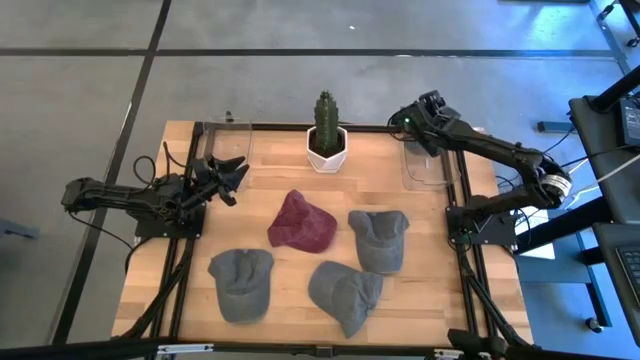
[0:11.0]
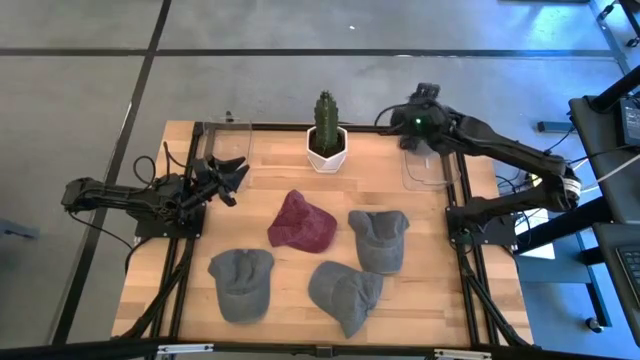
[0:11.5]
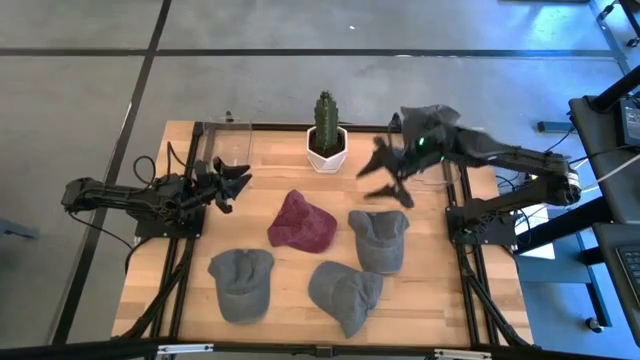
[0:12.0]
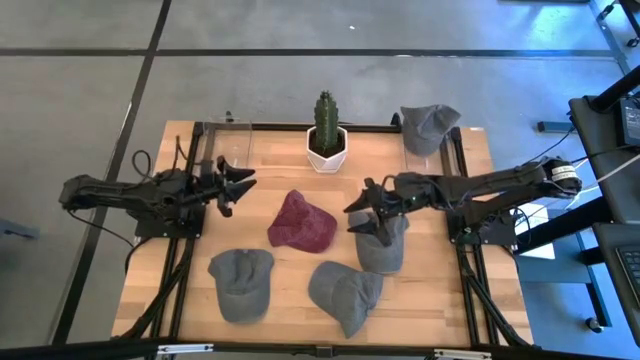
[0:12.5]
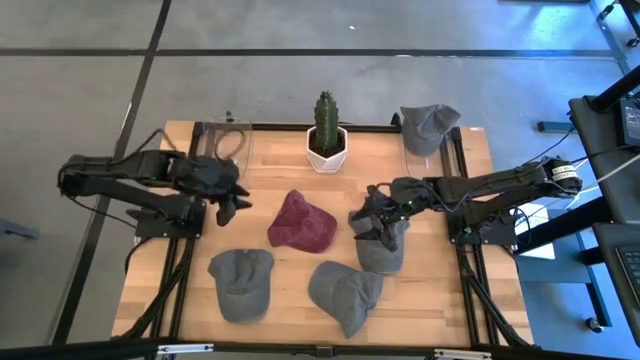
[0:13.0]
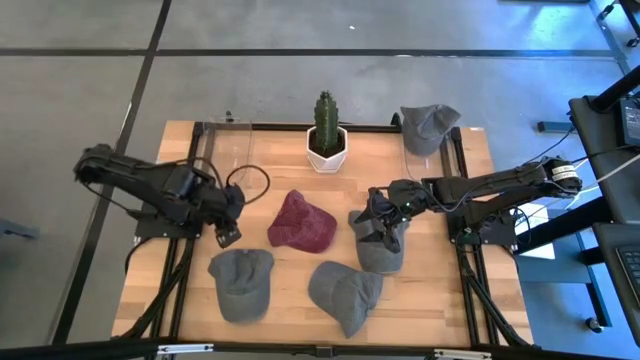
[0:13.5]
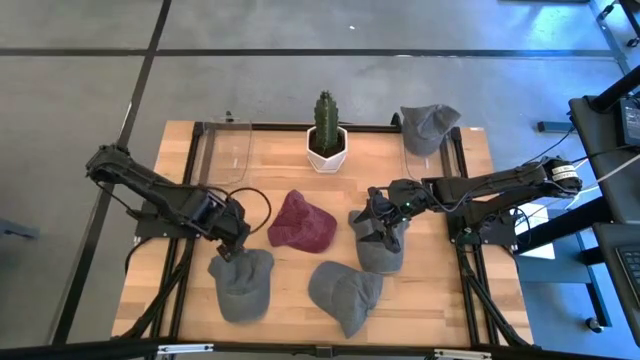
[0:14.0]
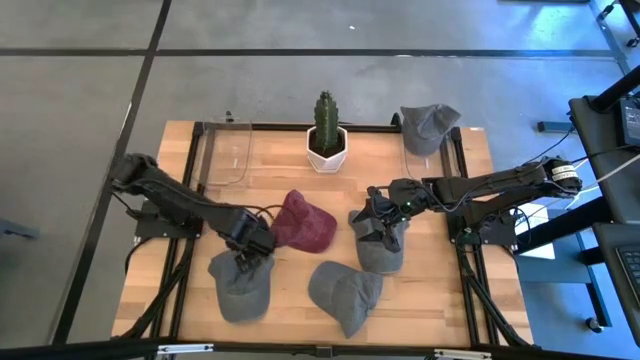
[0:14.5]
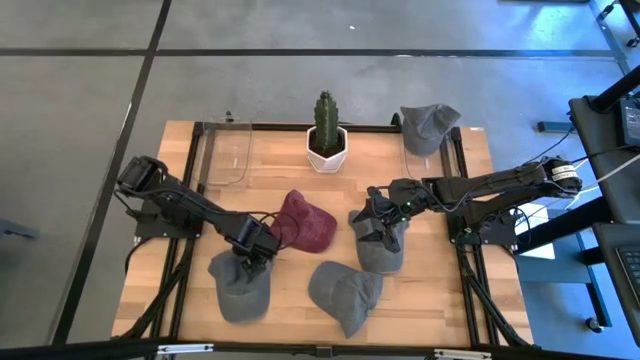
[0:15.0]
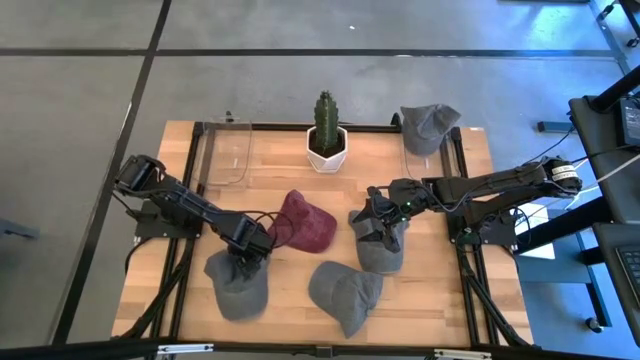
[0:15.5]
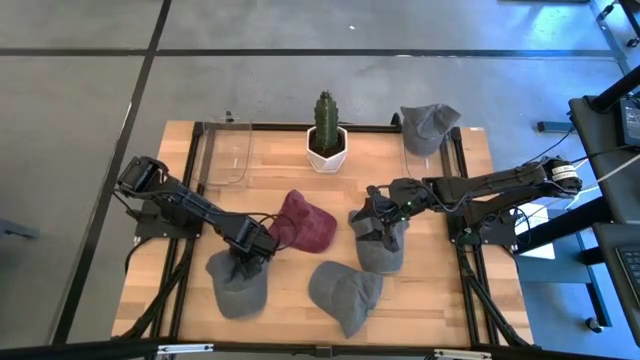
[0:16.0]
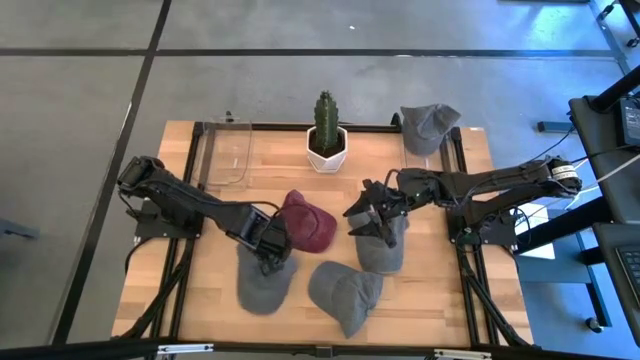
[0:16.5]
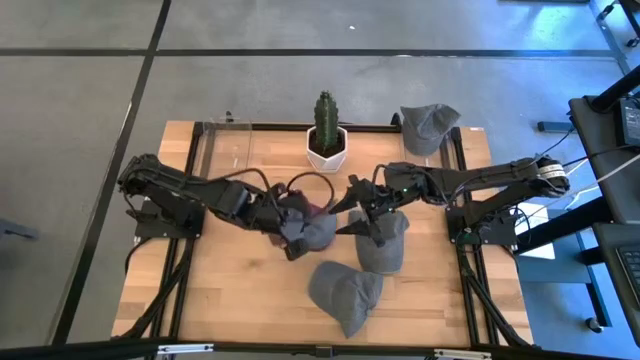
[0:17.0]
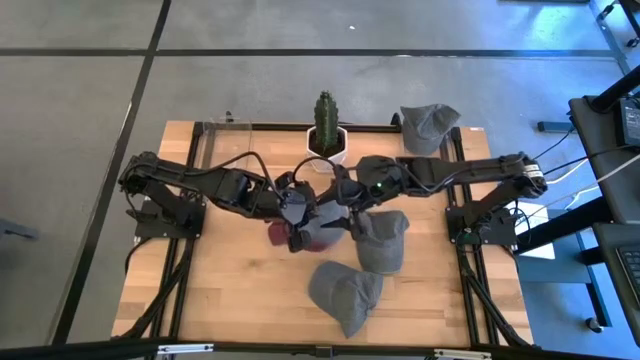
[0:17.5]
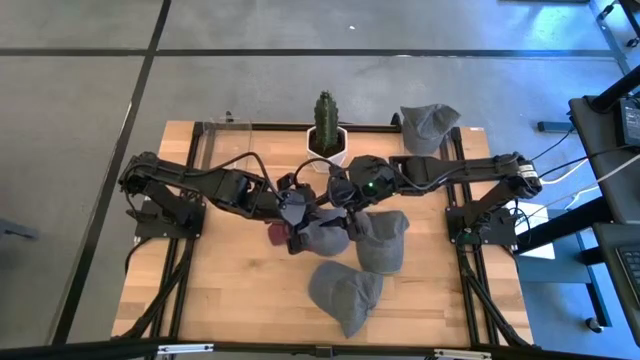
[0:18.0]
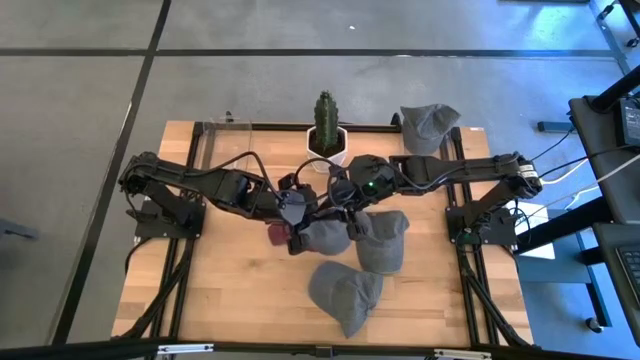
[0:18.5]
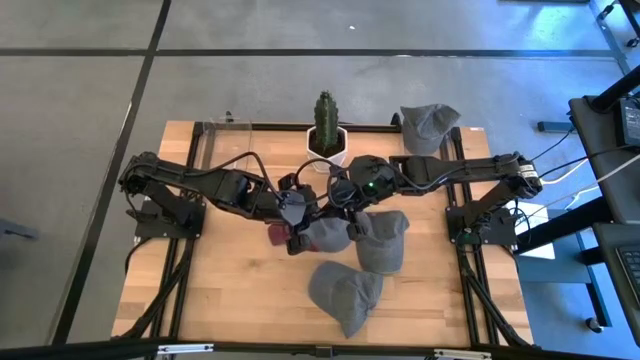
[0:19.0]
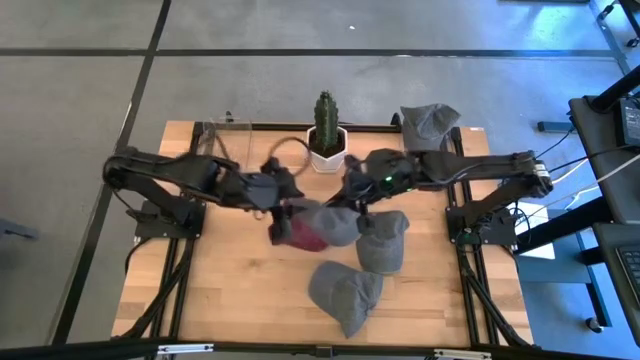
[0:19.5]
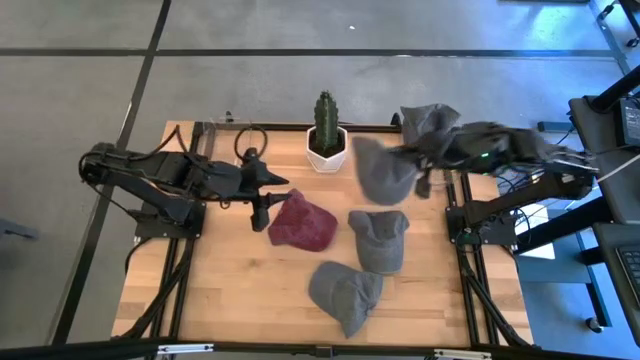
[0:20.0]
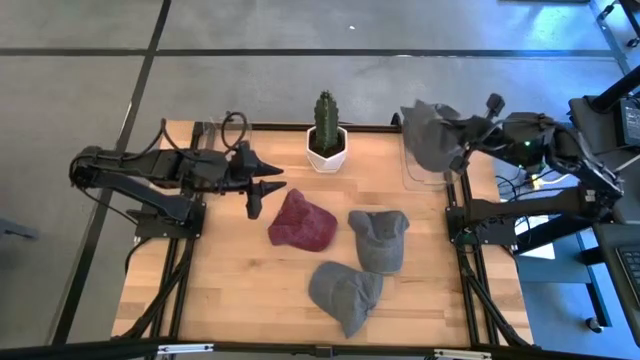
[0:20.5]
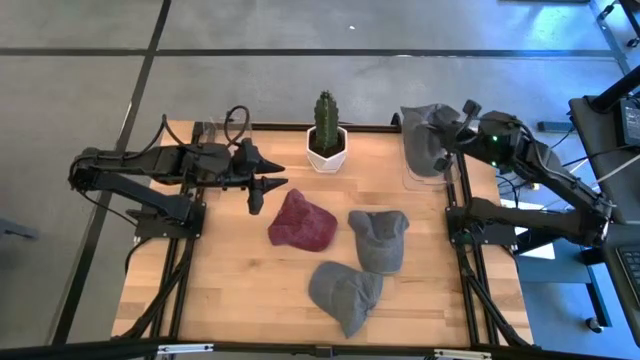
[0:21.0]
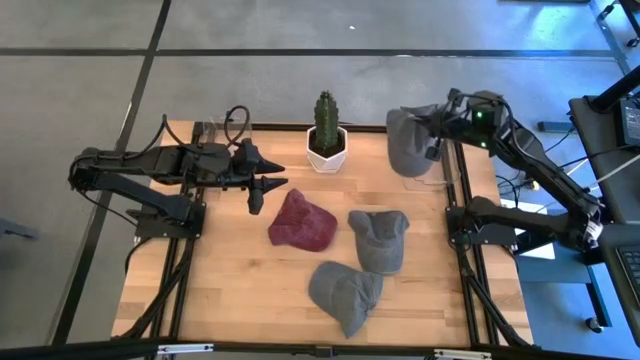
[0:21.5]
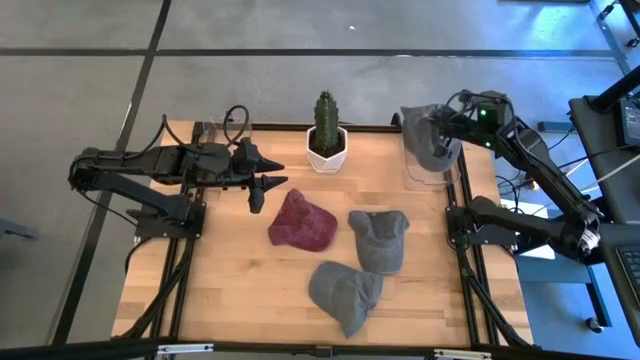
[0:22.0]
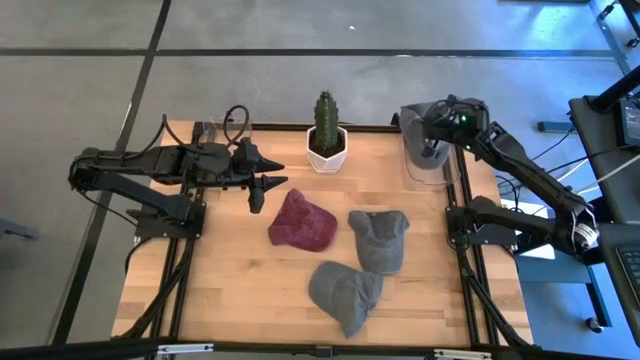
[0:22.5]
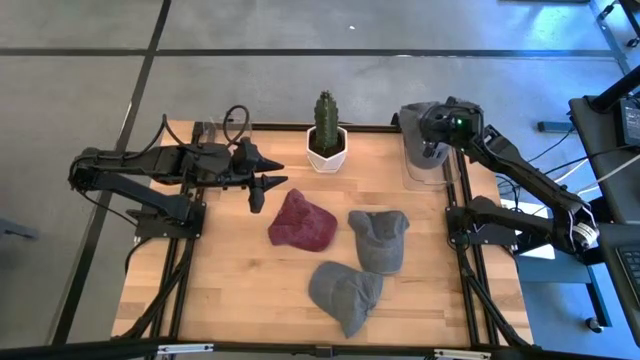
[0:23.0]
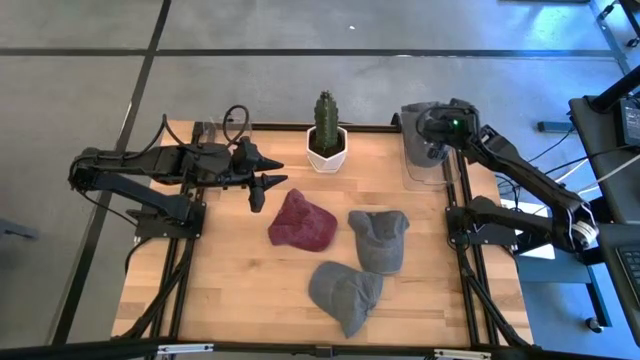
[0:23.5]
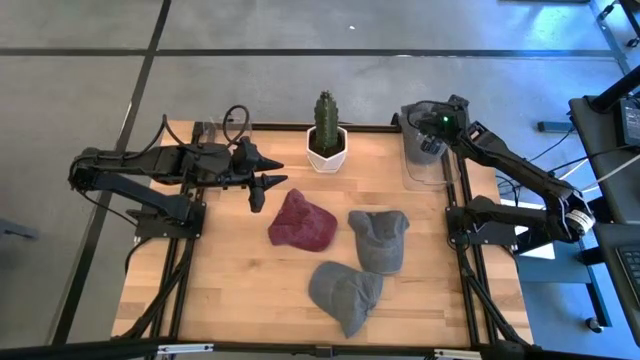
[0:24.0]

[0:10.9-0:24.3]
Task: Pick & Place hat
Put the gray cap into the right transparent bin

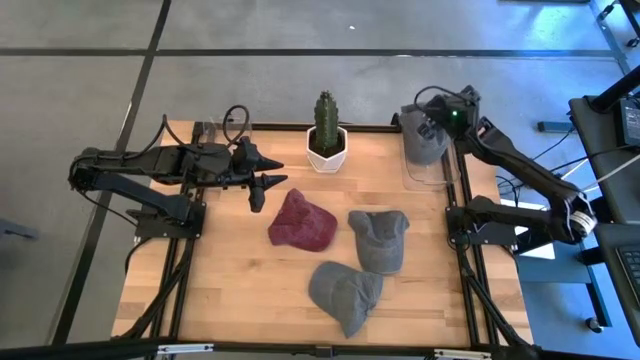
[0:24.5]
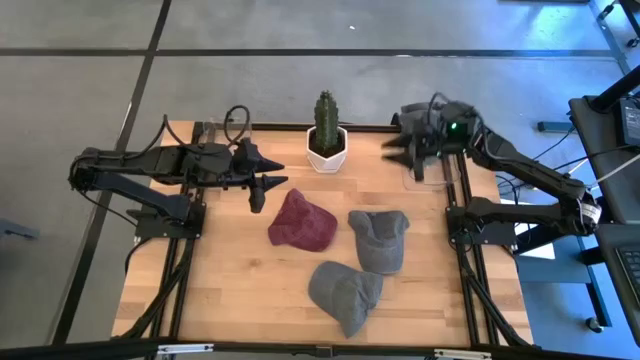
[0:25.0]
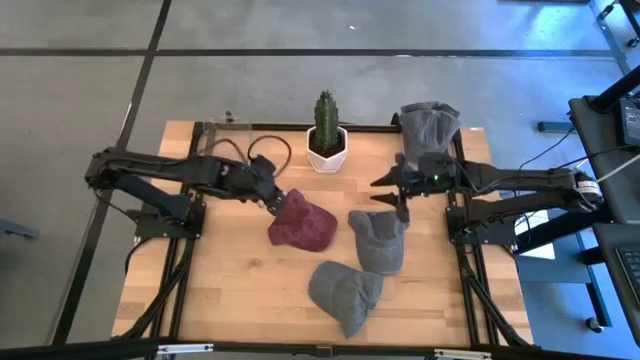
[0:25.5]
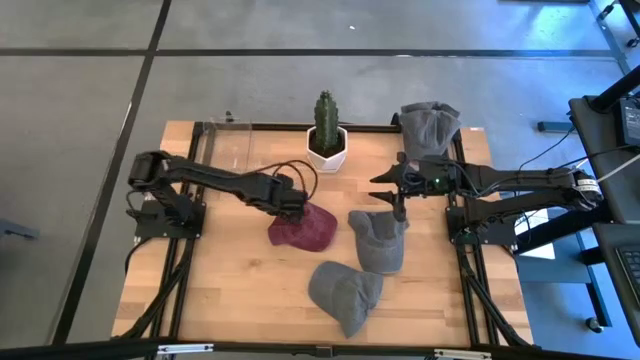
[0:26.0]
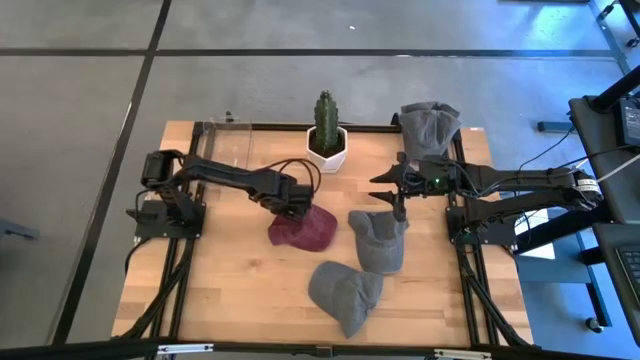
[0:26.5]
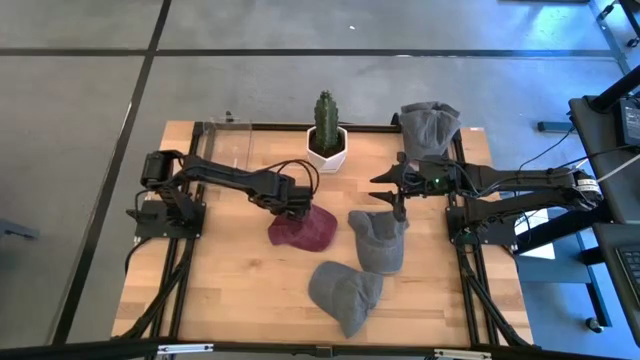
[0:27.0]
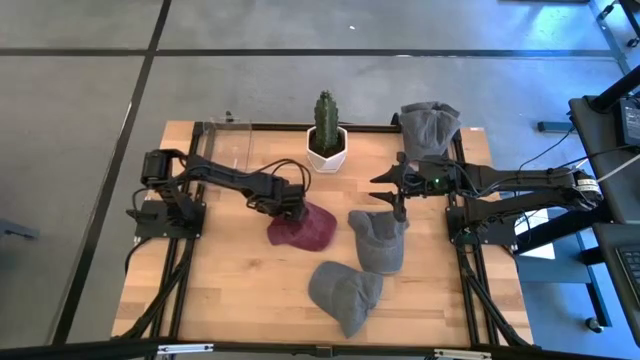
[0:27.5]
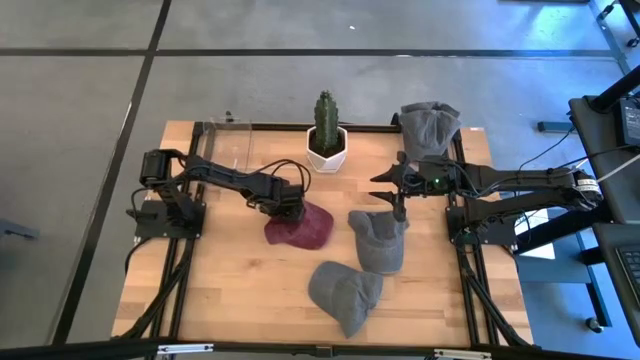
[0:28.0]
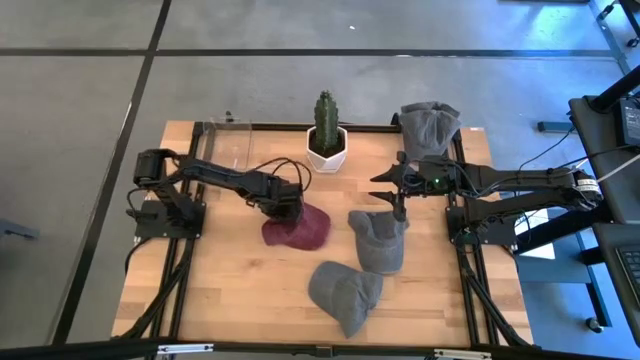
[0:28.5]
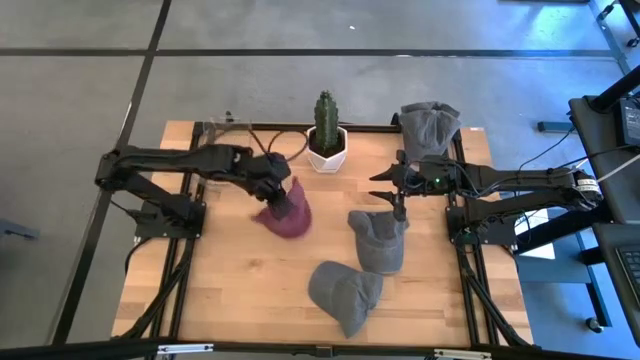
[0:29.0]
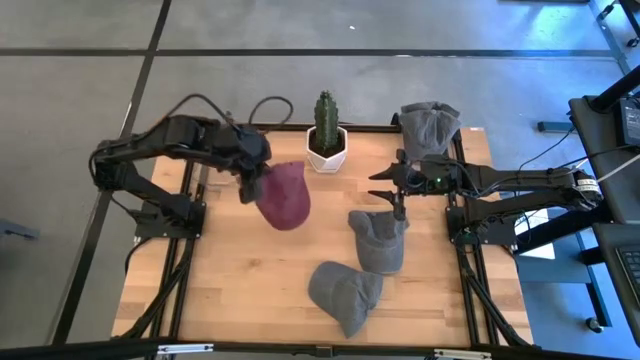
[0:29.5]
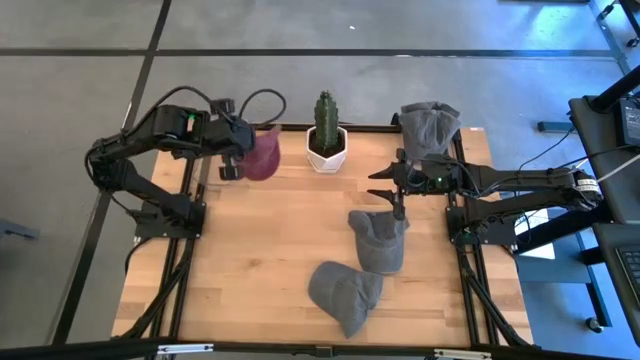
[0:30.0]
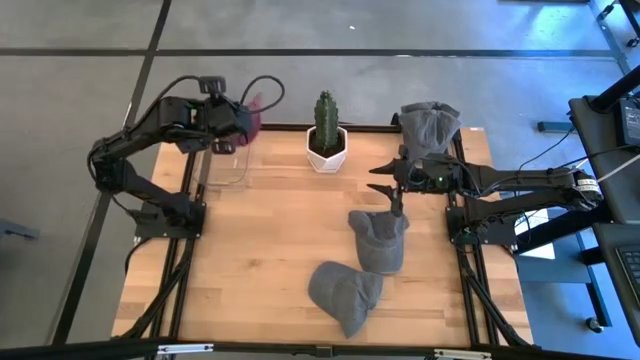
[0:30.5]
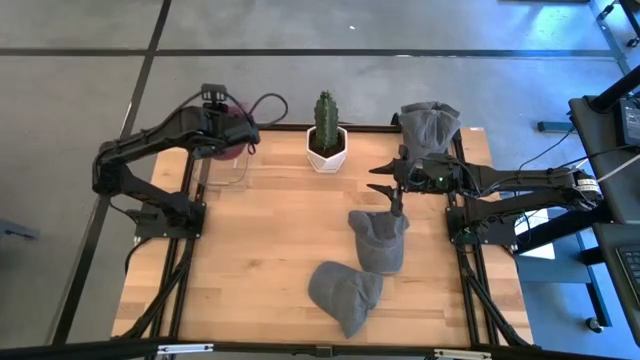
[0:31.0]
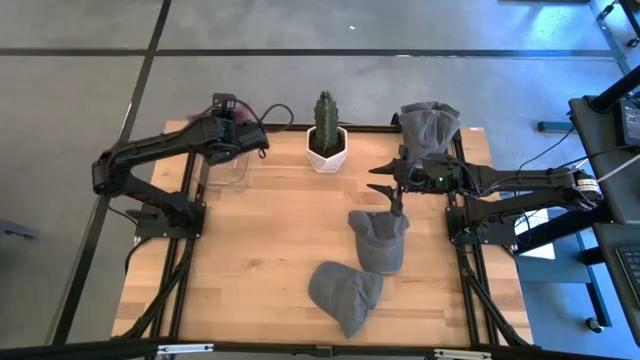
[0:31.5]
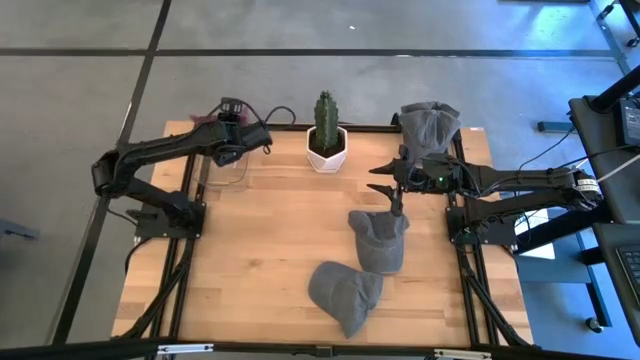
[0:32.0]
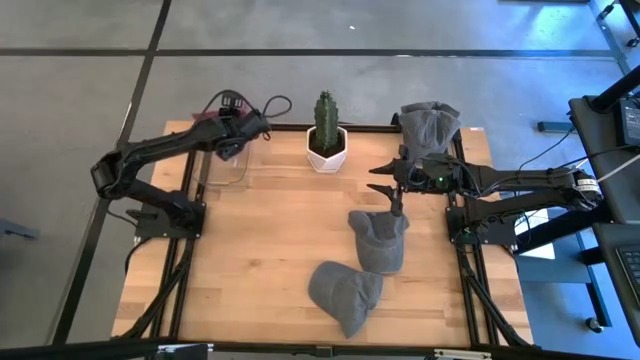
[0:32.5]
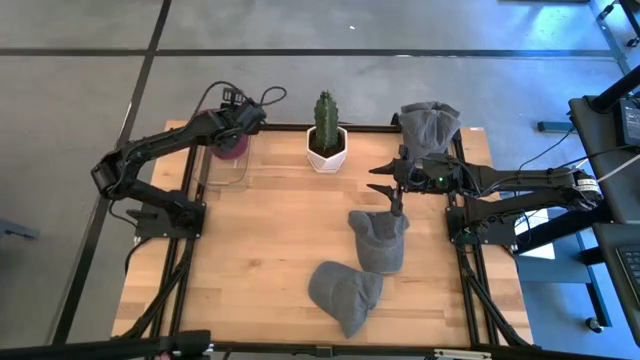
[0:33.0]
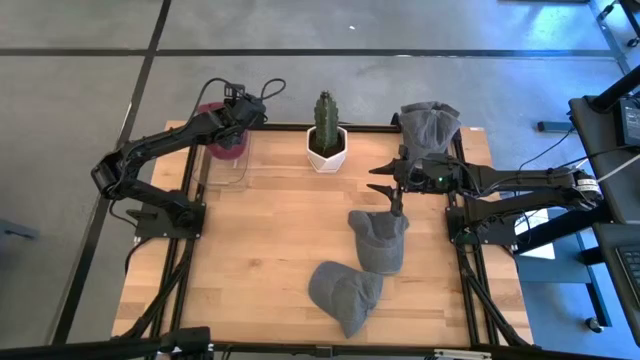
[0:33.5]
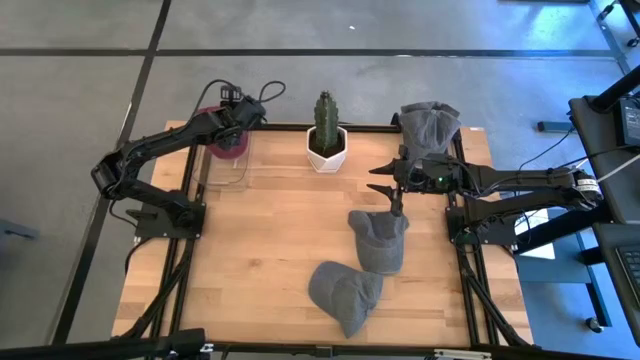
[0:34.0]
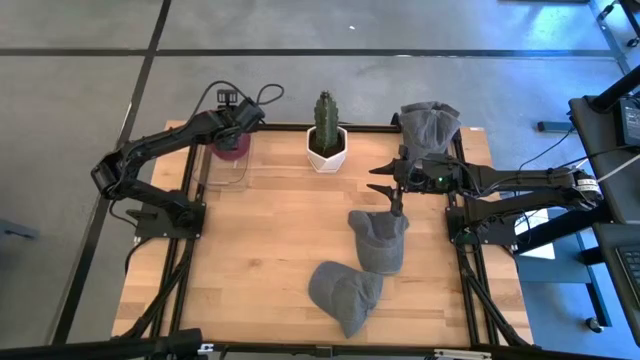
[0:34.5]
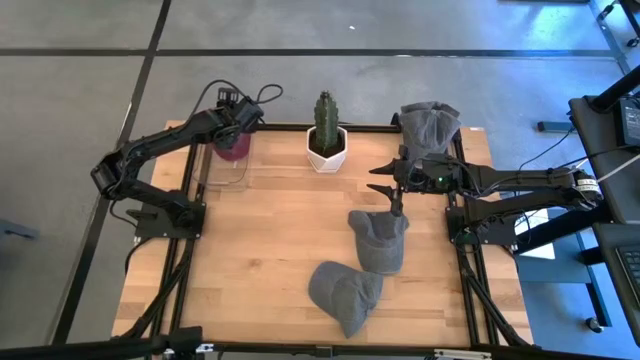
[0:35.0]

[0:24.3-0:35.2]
Put the red cap into the left transparent bin
